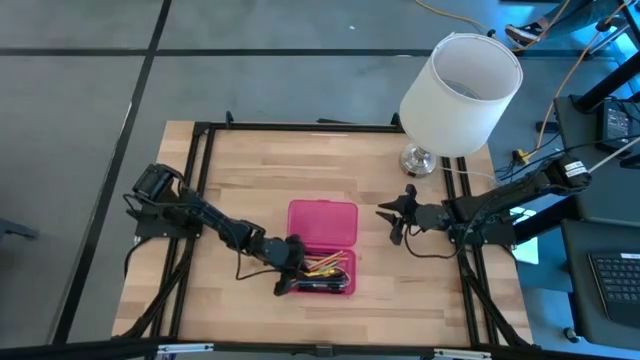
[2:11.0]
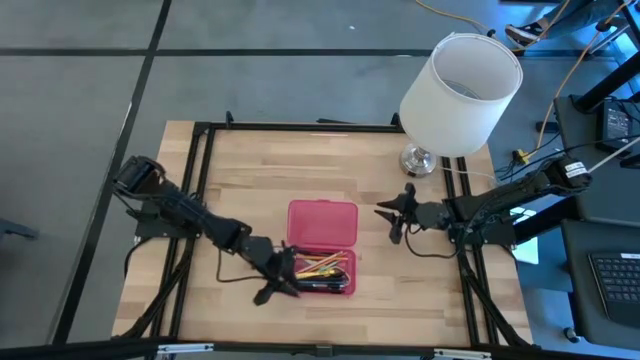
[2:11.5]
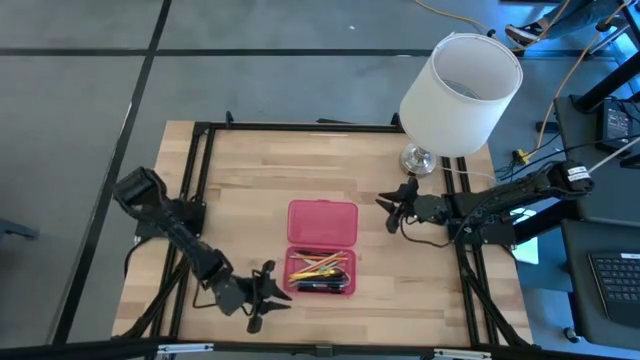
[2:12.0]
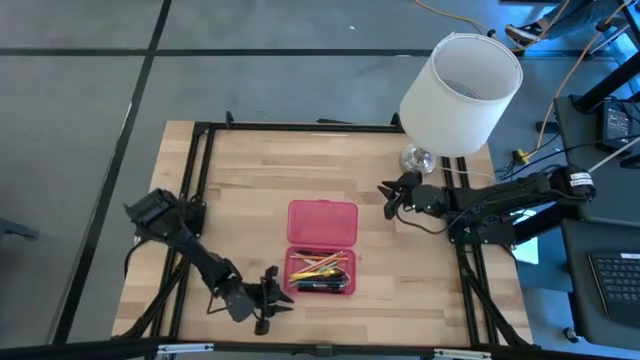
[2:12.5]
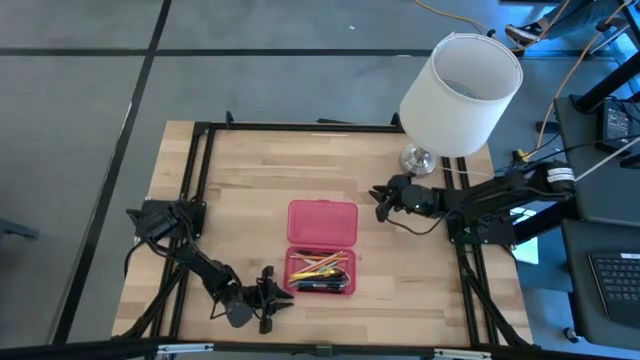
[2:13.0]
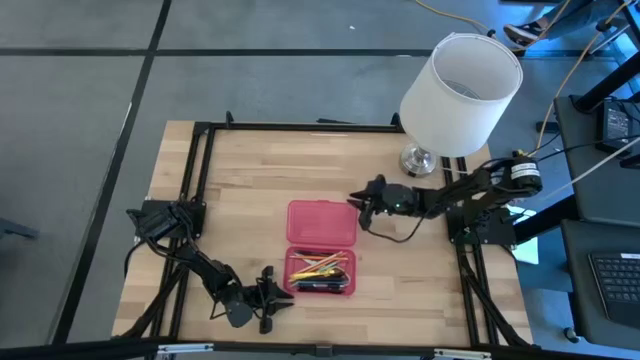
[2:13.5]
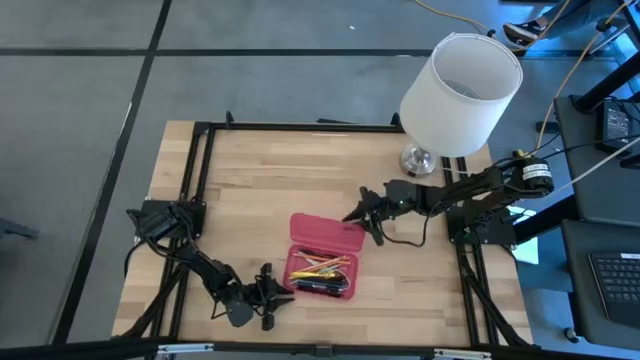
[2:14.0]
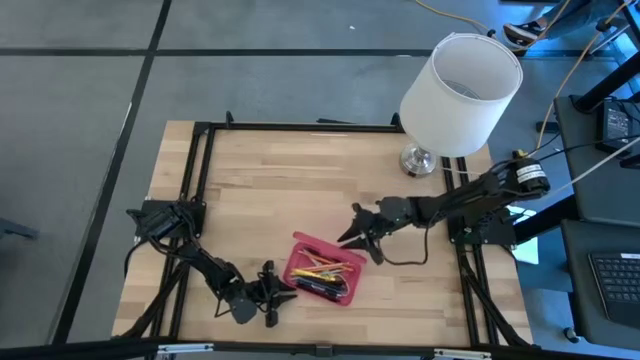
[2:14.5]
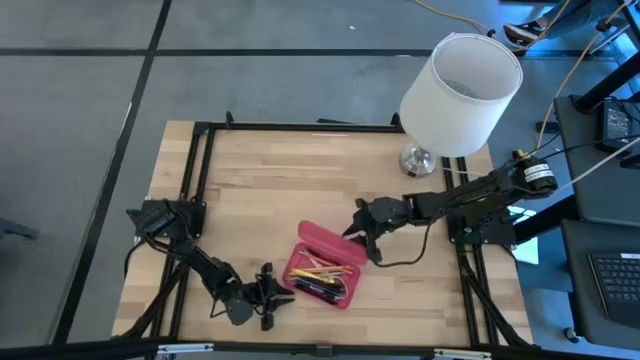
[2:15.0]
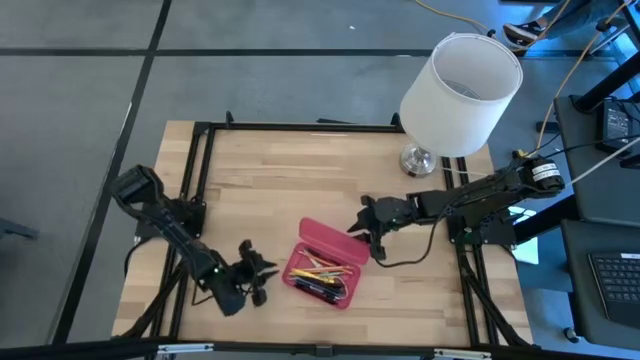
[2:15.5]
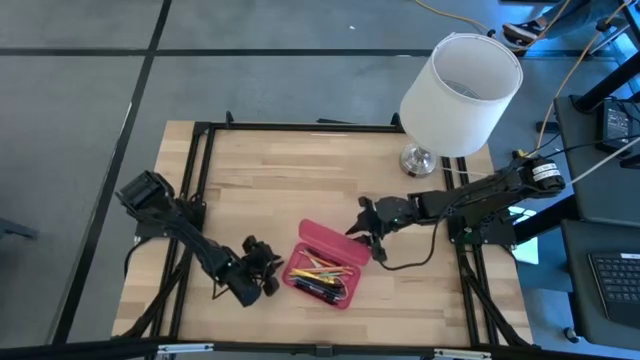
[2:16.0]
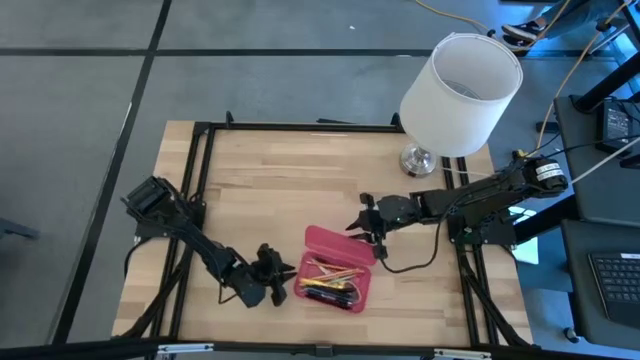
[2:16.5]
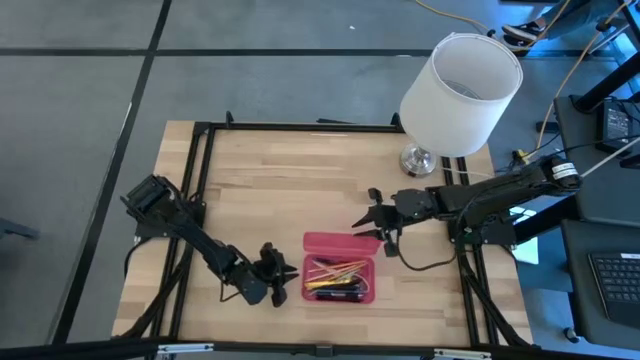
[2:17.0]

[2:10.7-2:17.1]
Task: Pick & place school supplies into a supply box
Close the red supply box

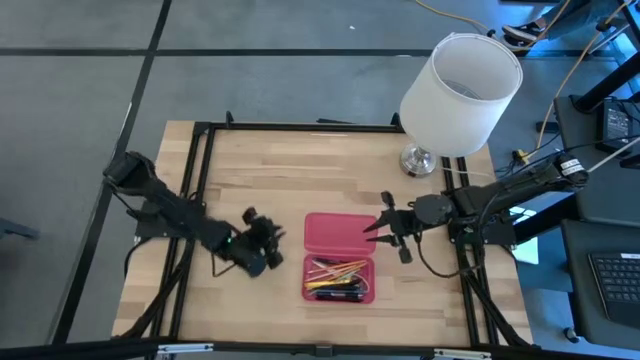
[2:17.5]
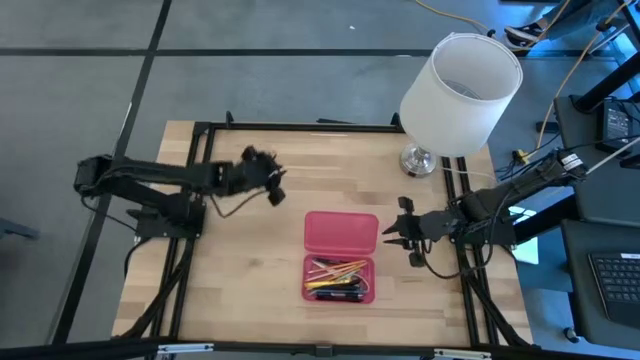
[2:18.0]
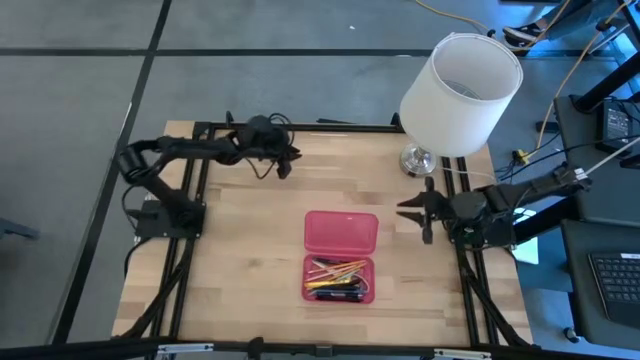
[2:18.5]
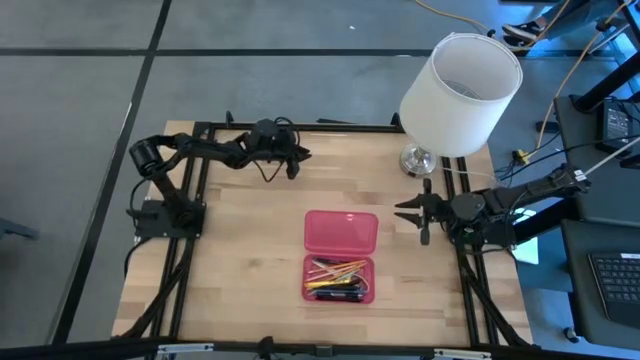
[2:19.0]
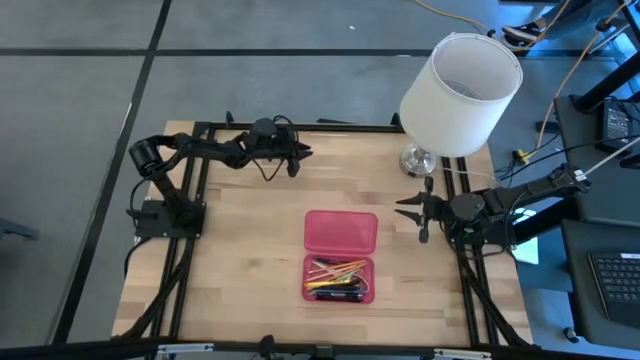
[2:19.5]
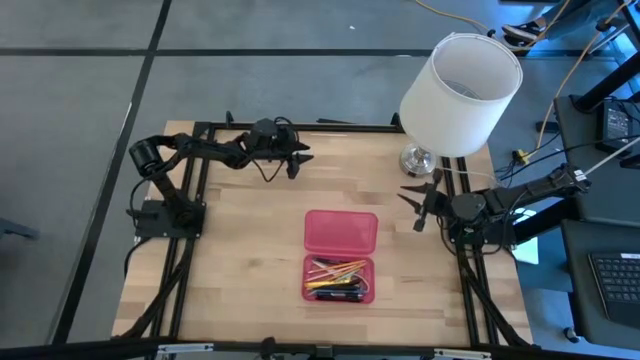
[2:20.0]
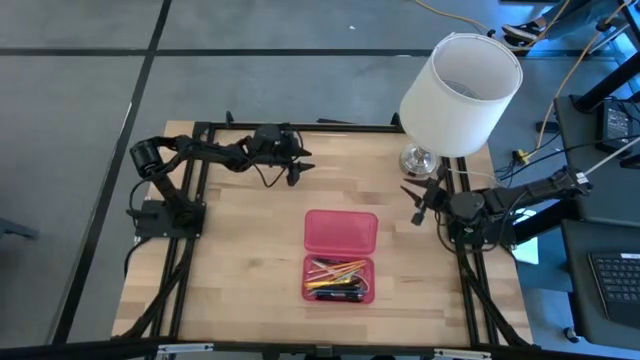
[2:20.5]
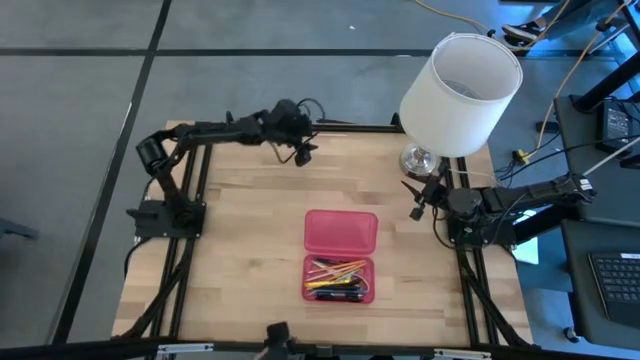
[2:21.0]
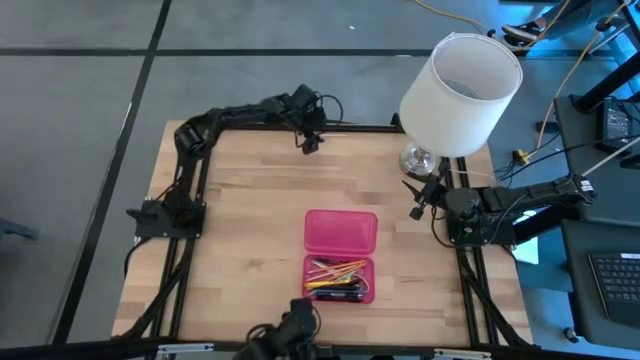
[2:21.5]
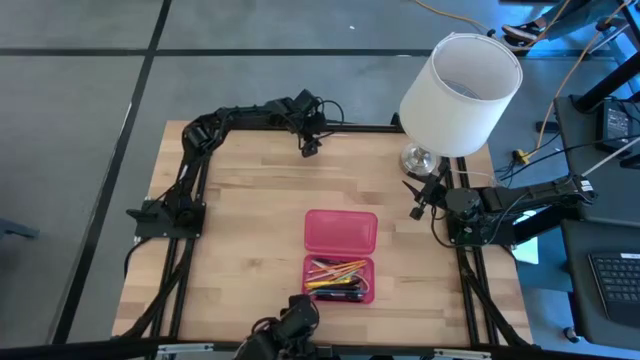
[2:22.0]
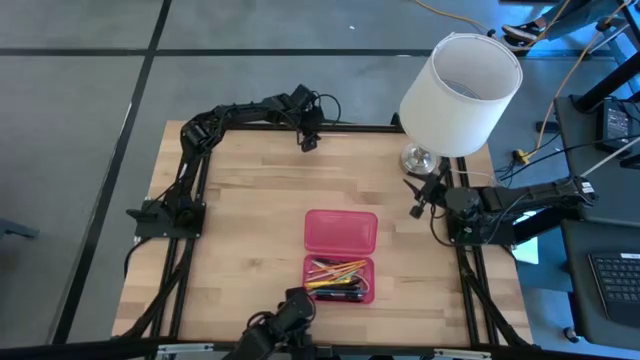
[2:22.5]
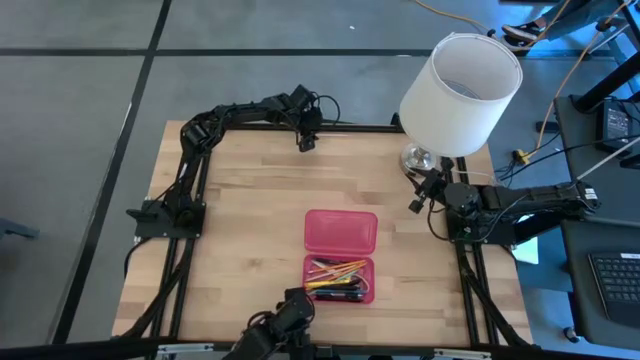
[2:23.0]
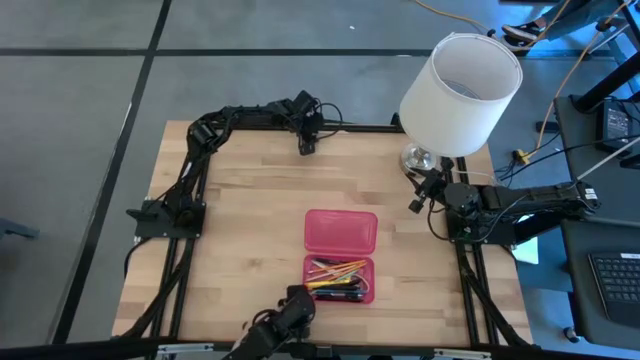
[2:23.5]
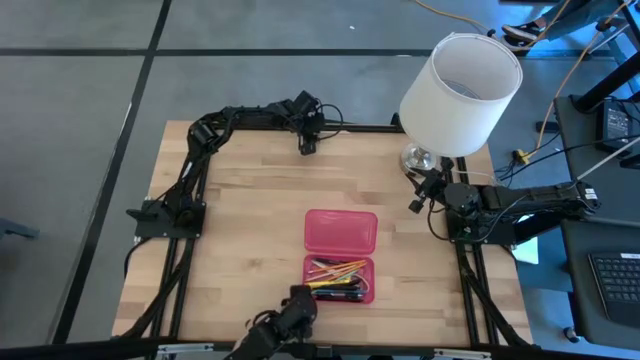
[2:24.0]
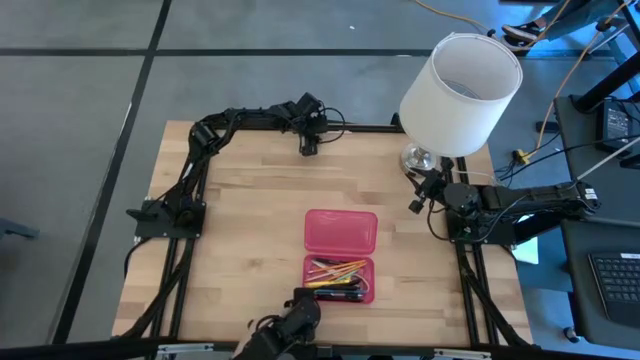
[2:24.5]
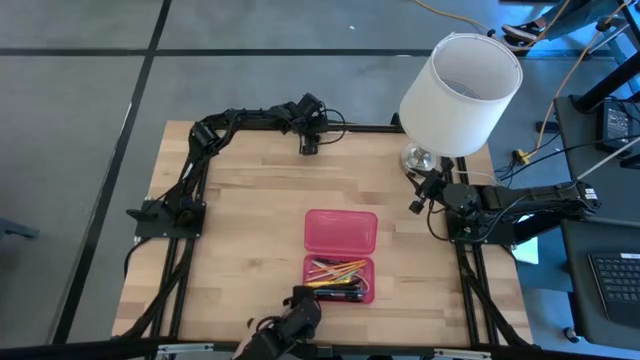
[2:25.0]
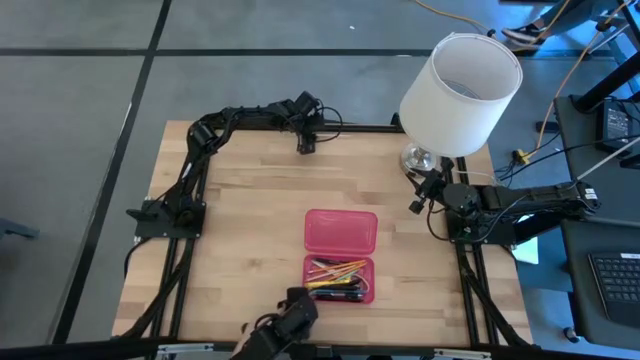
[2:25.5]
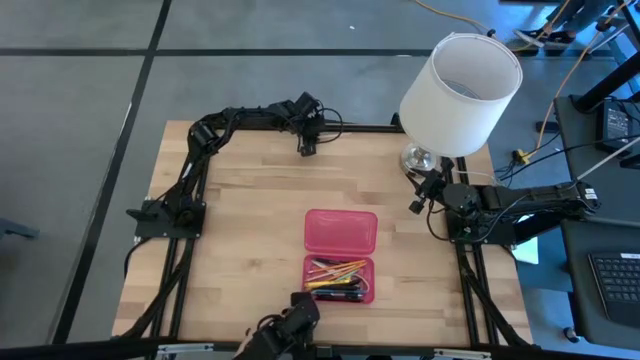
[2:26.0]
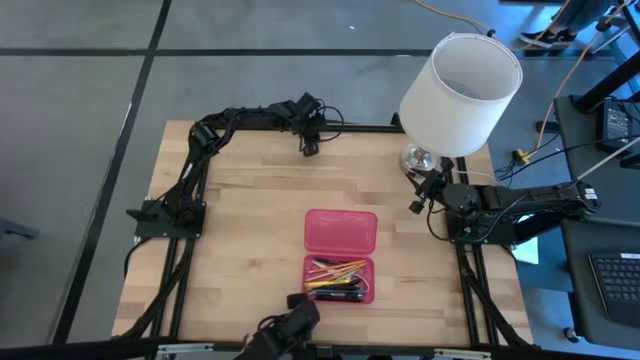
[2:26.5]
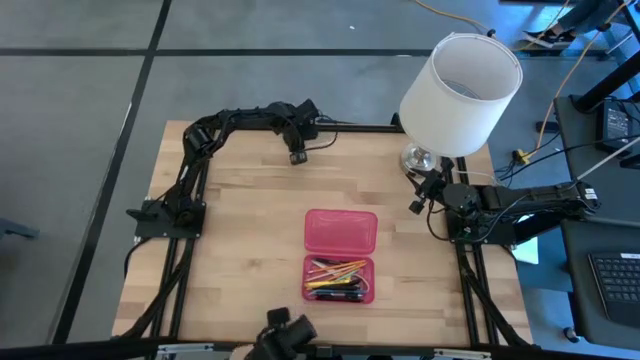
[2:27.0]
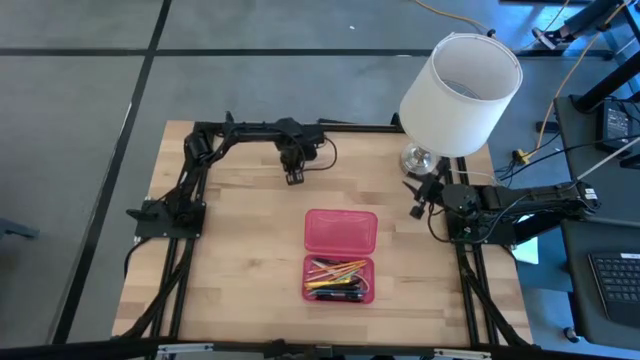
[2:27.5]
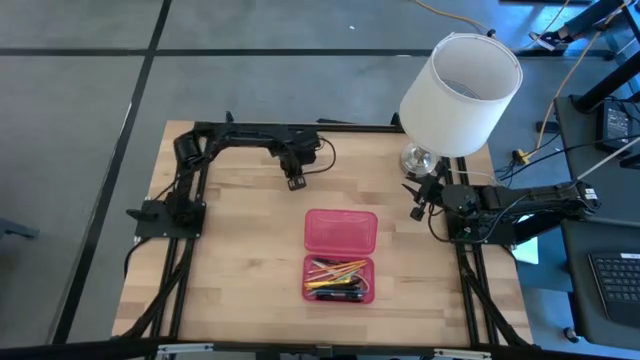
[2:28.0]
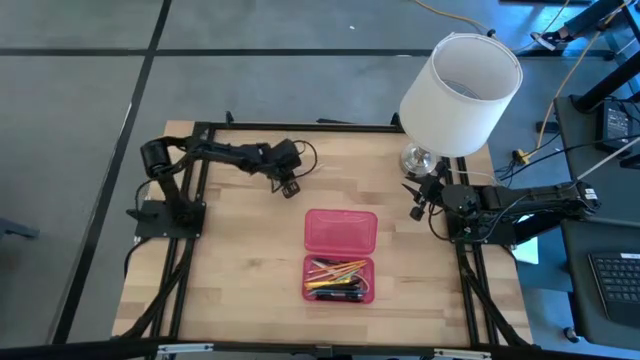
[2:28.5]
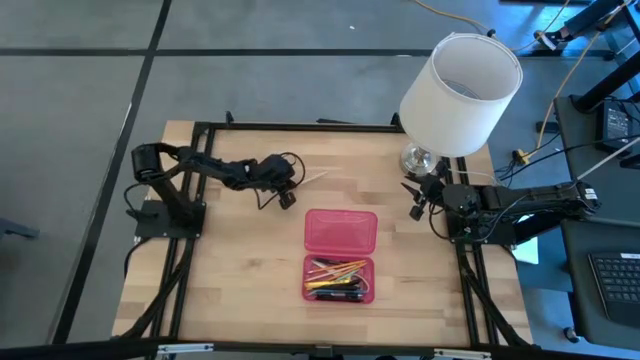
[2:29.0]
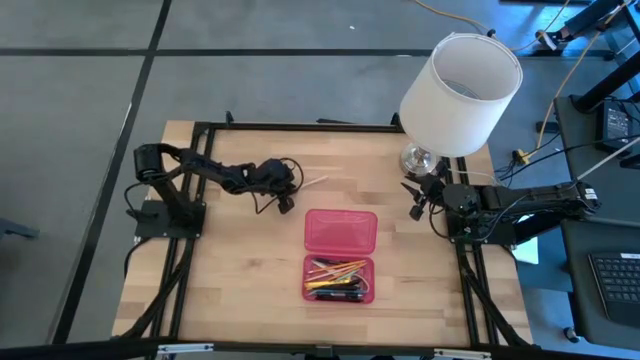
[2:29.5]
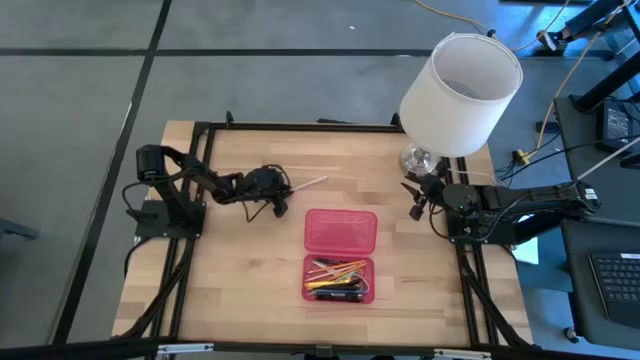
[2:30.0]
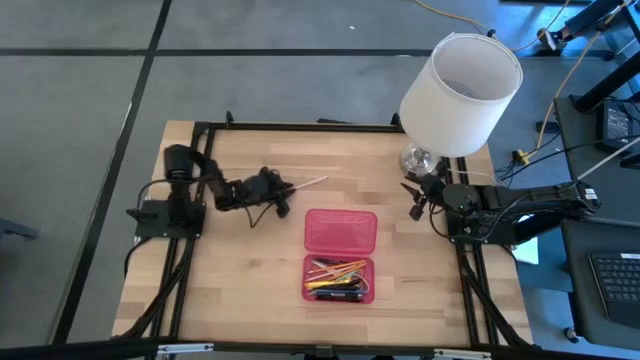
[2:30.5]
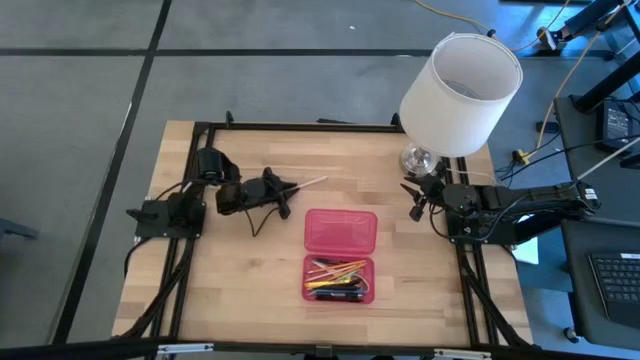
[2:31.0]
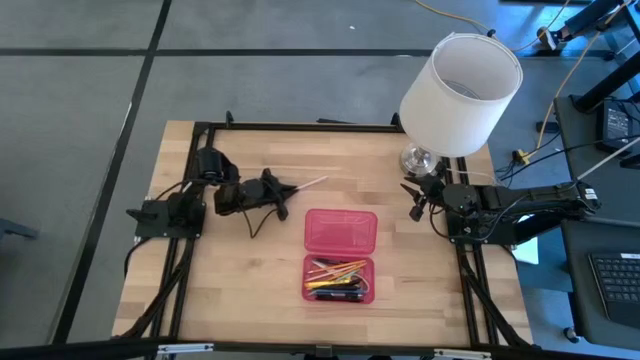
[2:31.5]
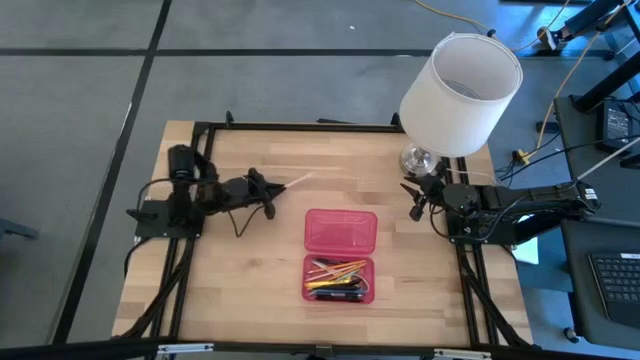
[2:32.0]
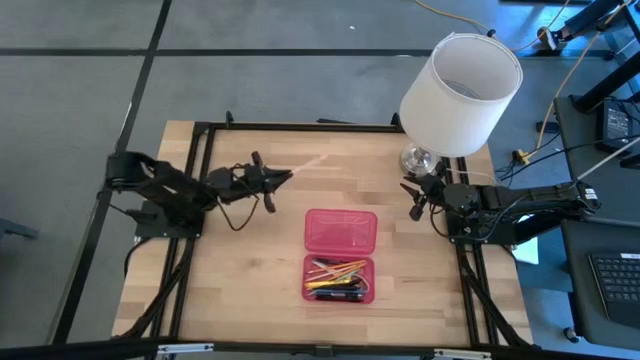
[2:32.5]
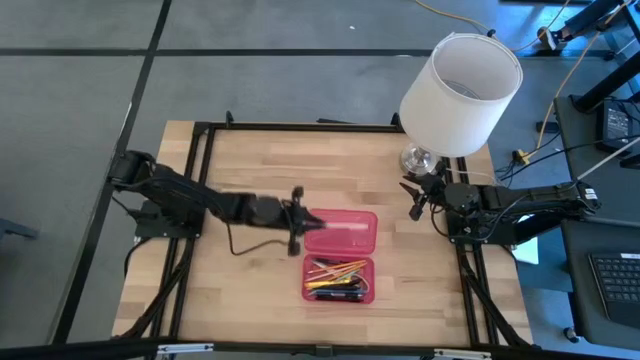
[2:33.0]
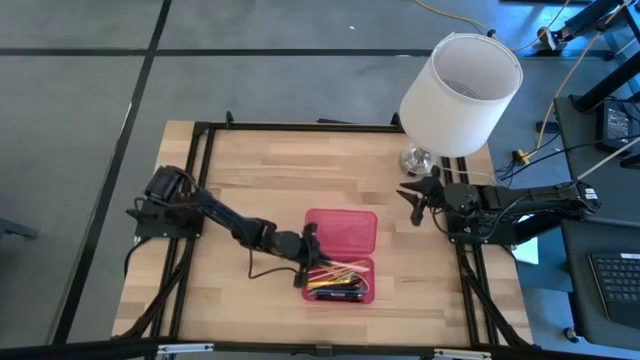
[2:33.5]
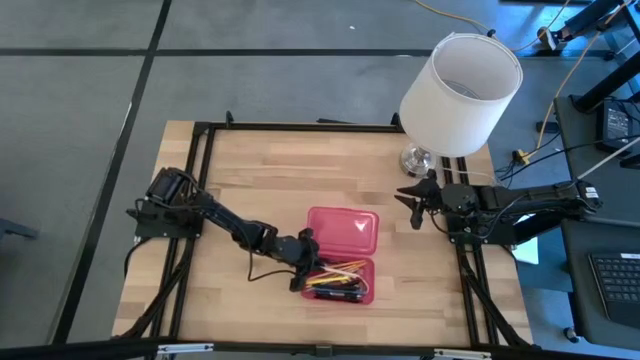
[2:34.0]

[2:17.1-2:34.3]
Put the brown pen into the red supply box
